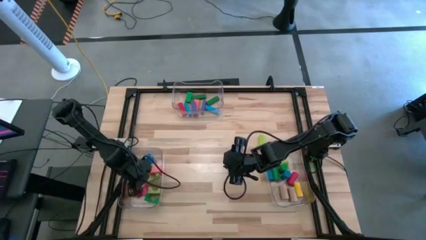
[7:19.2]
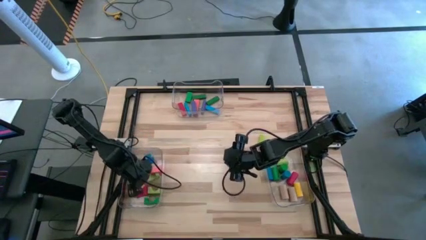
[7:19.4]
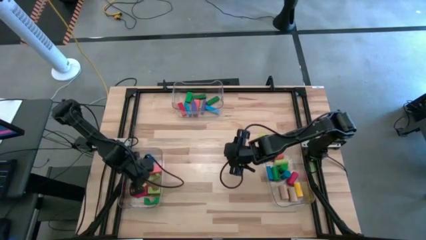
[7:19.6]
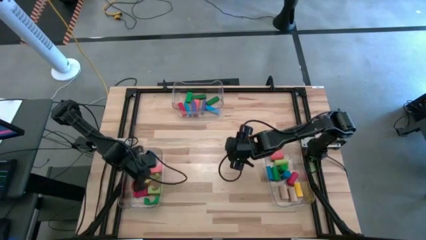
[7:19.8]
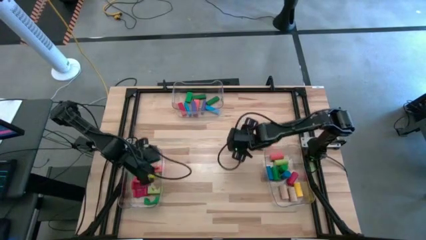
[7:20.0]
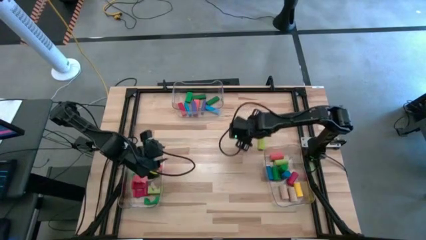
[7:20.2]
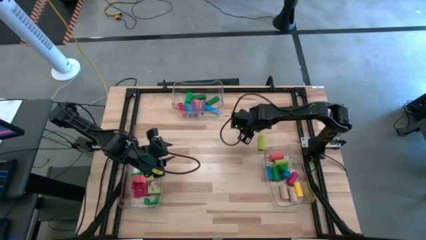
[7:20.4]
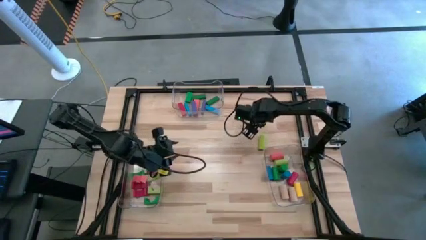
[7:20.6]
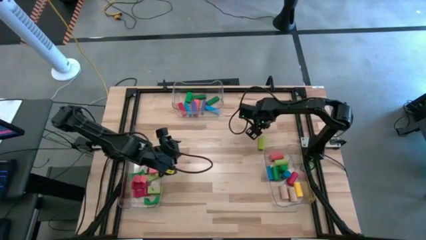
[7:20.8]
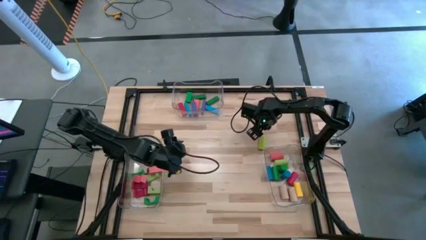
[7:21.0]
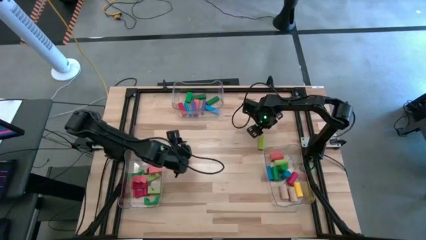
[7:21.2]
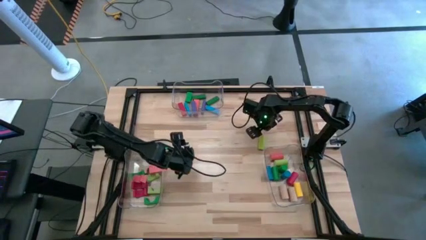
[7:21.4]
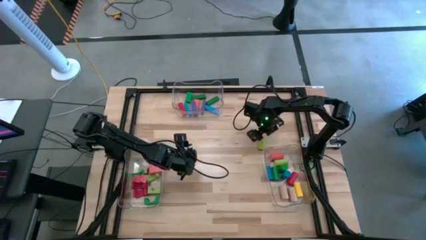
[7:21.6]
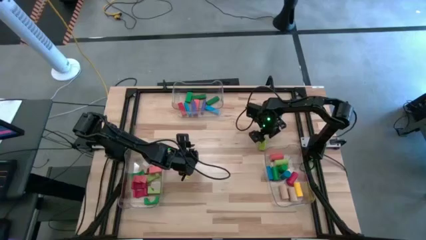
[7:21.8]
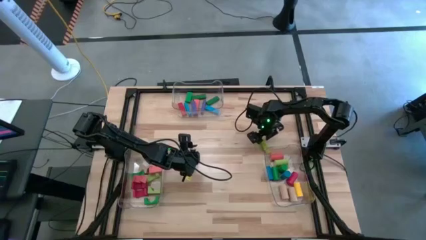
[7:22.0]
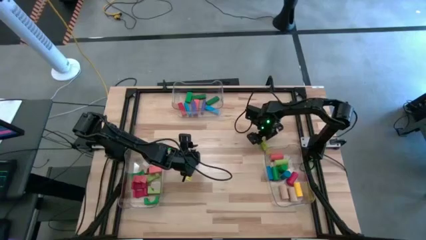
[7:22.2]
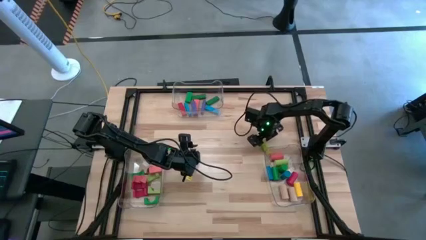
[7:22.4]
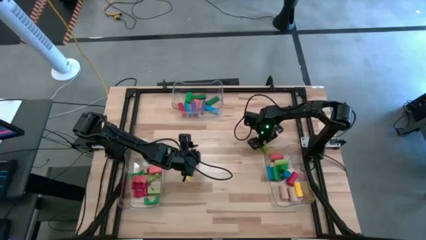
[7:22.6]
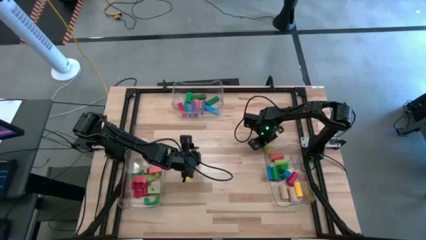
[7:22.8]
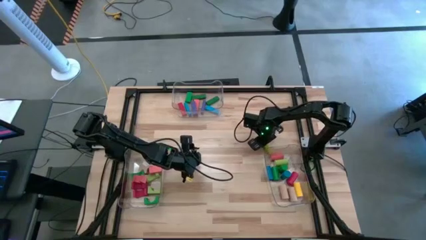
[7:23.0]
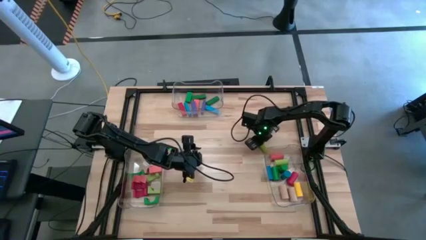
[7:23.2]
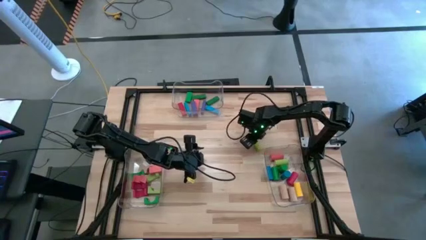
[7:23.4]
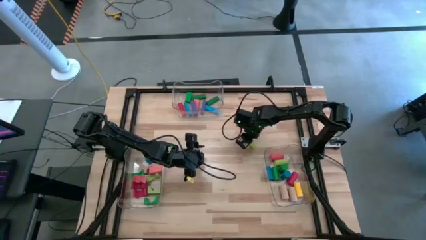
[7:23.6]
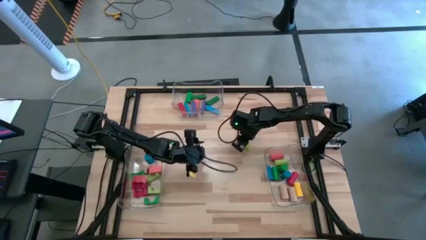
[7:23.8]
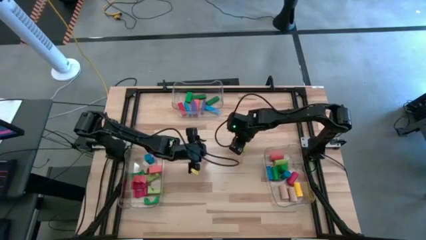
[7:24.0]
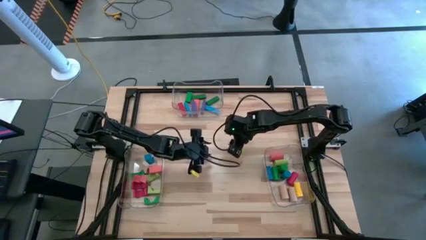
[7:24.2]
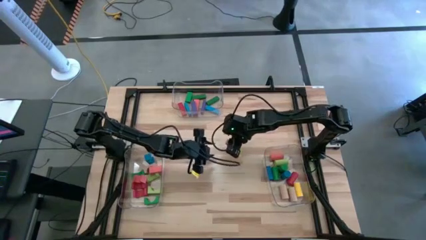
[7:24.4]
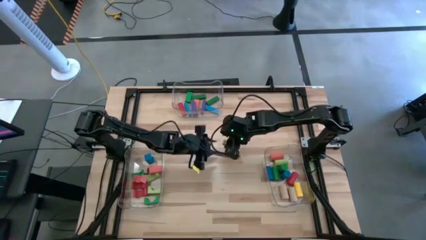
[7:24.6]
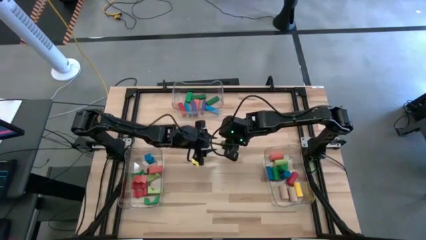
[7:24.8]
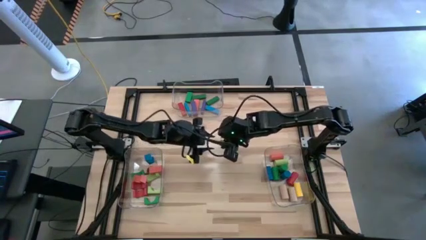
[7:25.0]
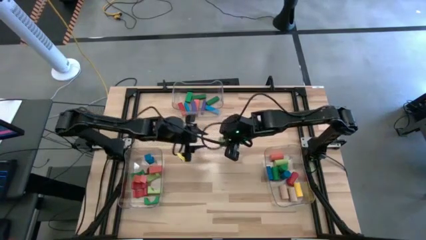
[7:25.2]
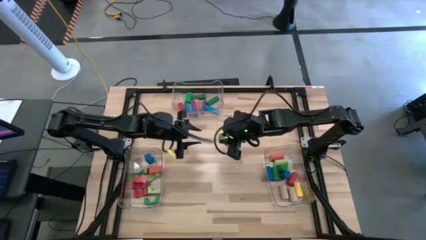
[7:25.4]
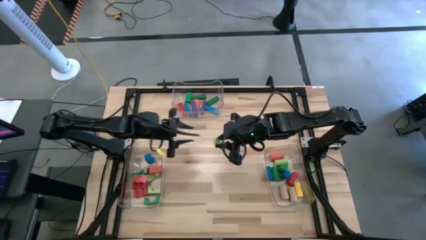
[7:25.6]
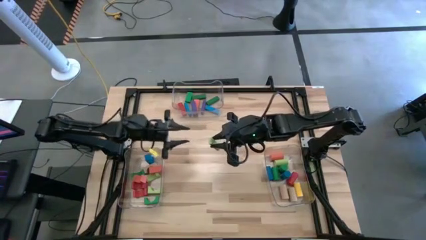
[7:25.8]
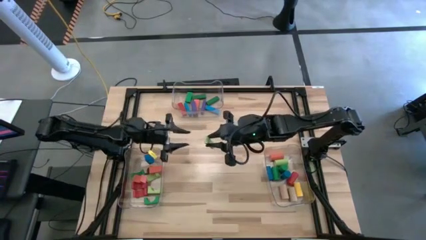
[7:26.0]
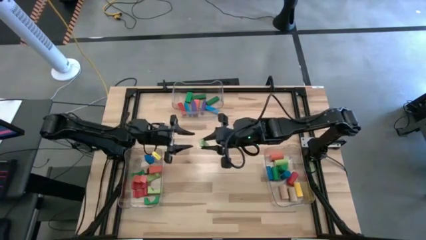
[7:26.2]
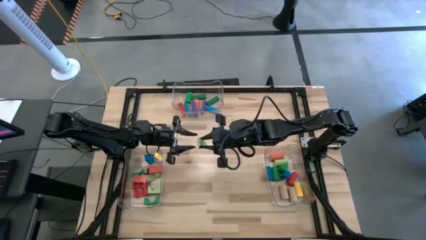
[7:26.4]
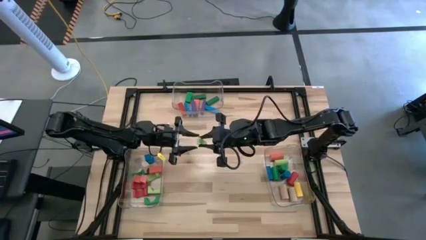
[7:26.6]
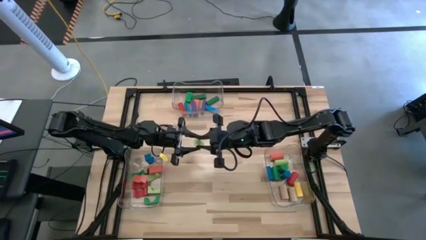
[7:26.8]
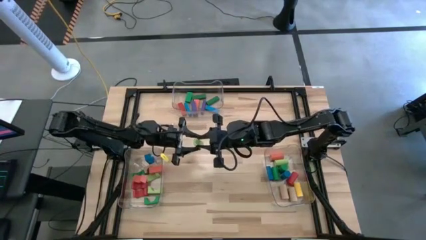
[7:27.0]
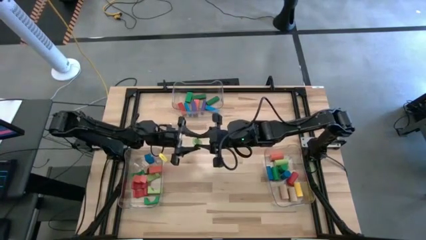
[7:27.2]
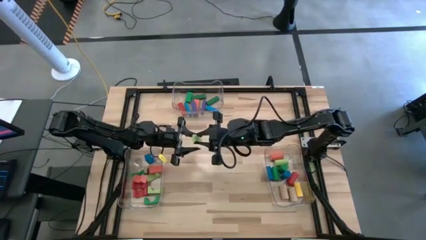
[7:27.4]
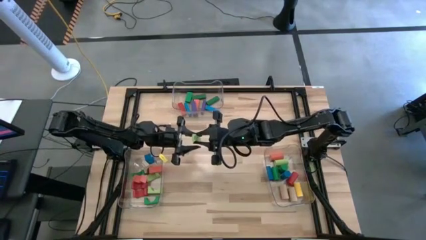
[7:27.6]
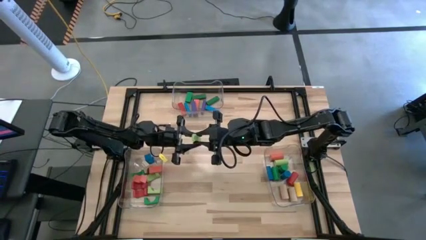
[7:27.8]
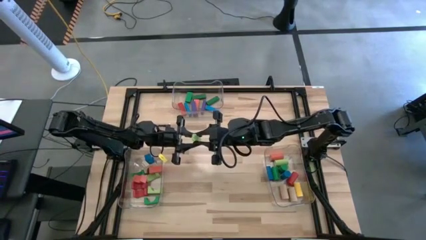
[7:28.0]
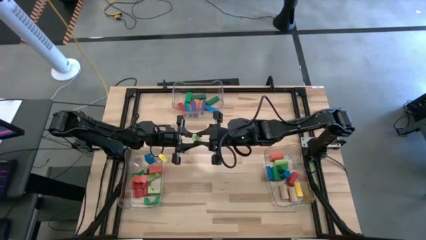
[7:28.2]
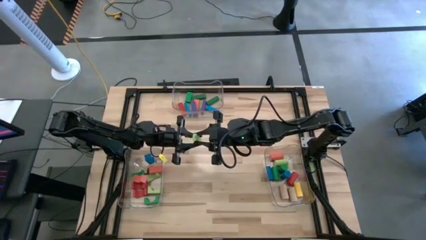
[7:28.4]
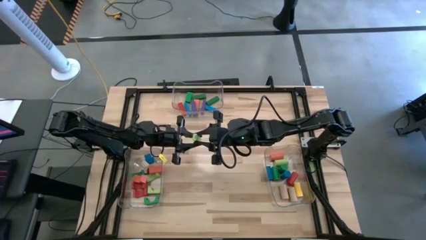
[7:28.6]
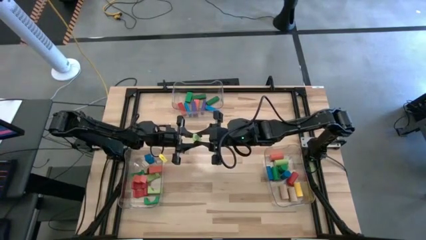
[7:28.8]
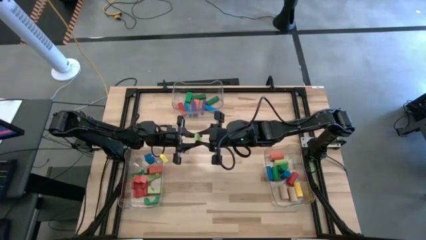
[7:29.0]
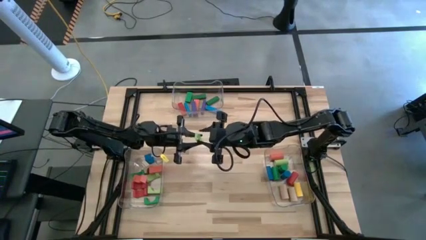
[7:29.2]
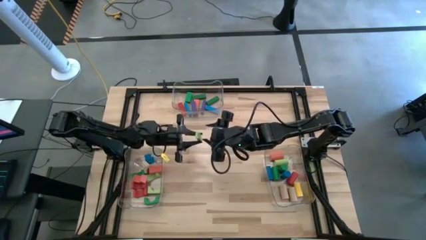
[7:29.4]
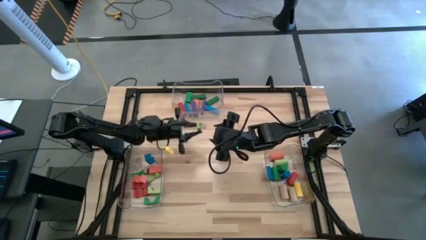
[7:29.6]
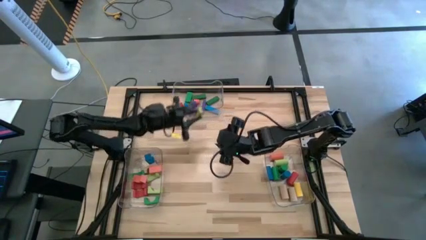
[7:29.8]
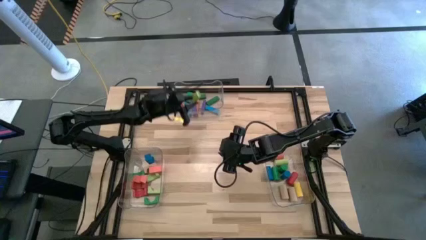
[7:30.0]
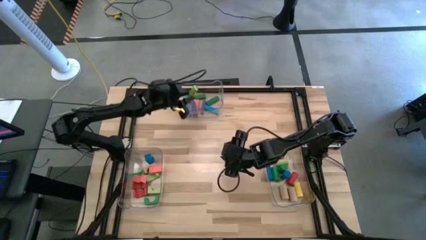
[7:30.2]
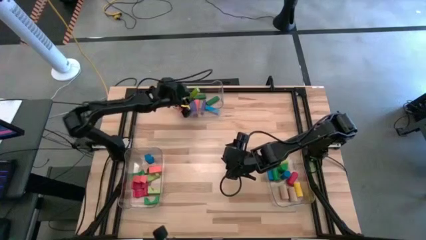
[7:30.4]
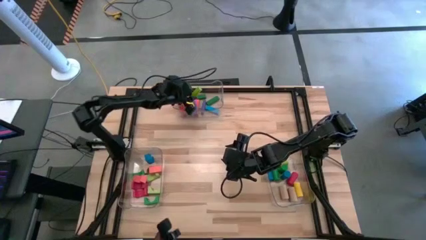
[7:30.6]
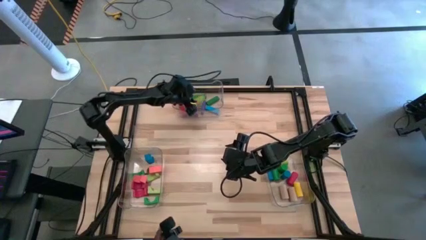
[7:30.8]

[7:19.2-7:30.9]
Task: Sort blocks by size
Put the light green rectangular block into the top transparent bin
